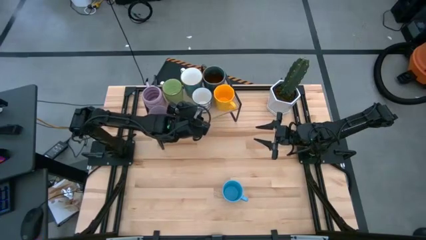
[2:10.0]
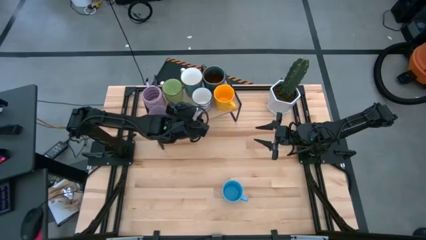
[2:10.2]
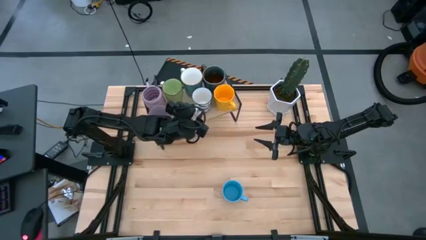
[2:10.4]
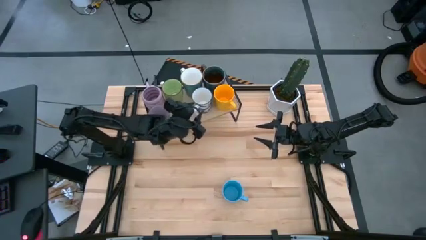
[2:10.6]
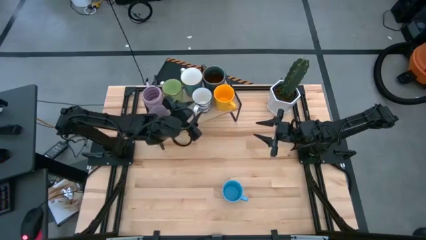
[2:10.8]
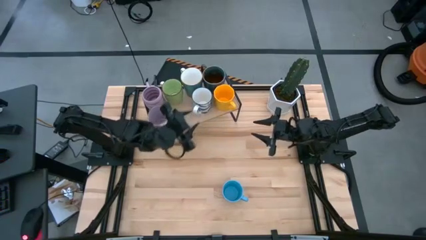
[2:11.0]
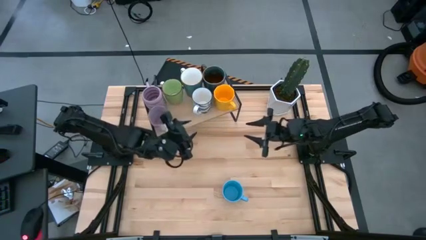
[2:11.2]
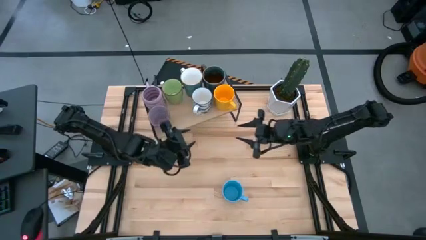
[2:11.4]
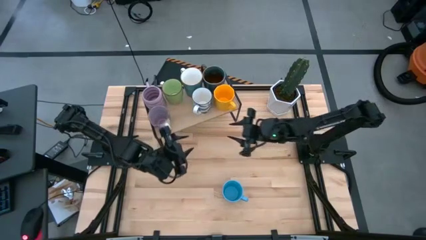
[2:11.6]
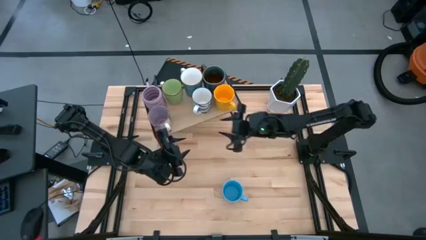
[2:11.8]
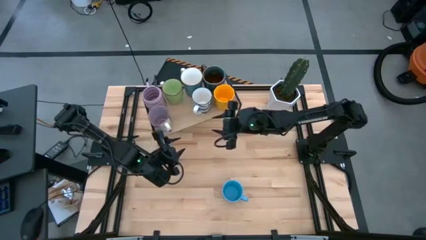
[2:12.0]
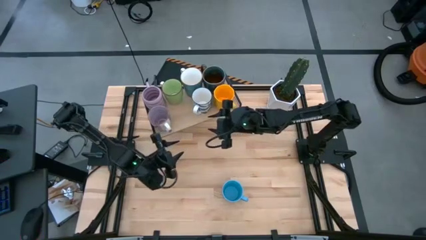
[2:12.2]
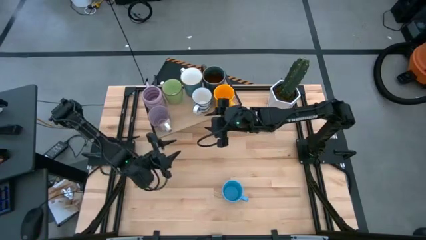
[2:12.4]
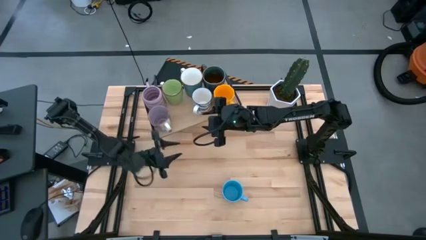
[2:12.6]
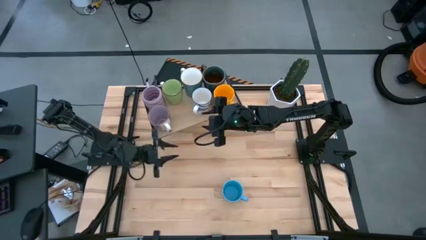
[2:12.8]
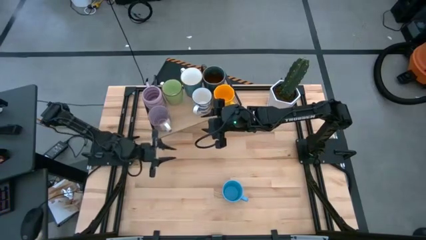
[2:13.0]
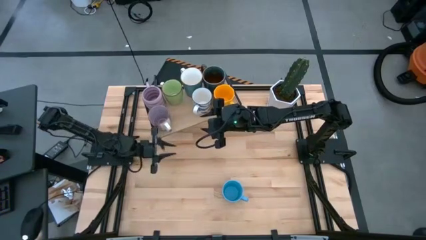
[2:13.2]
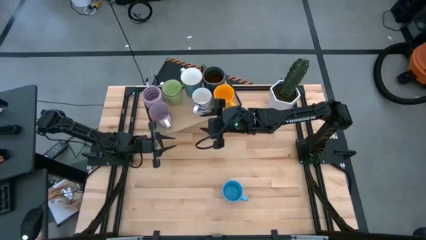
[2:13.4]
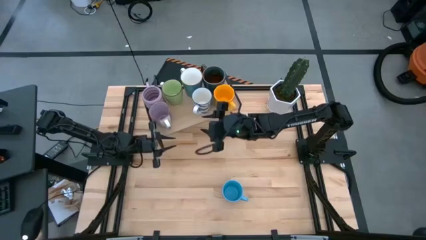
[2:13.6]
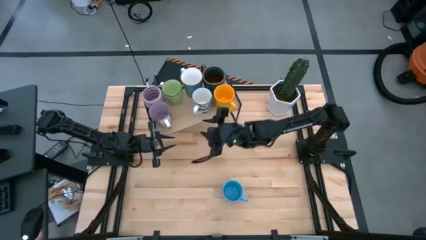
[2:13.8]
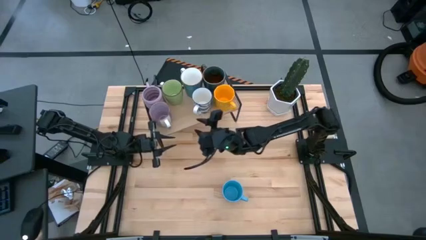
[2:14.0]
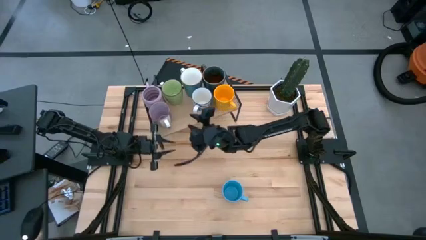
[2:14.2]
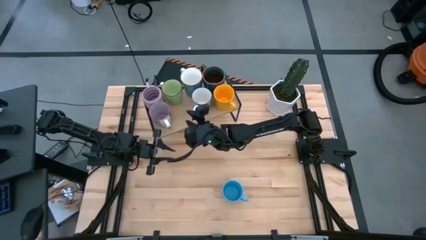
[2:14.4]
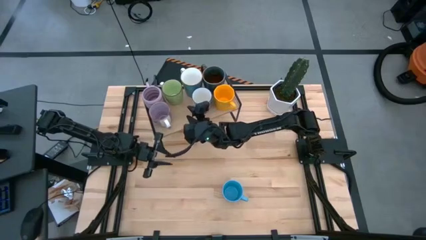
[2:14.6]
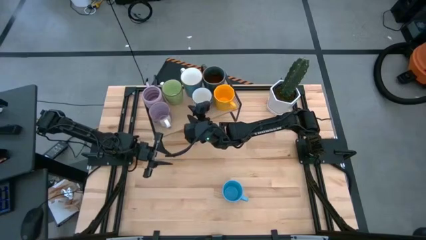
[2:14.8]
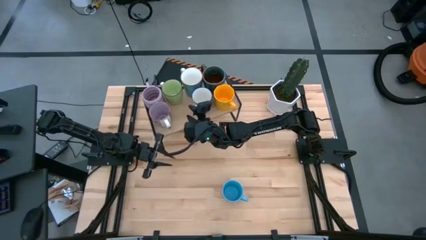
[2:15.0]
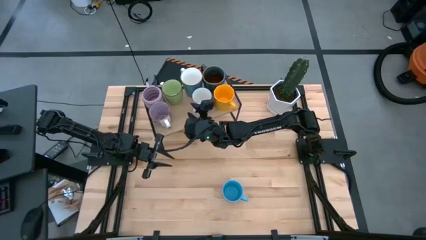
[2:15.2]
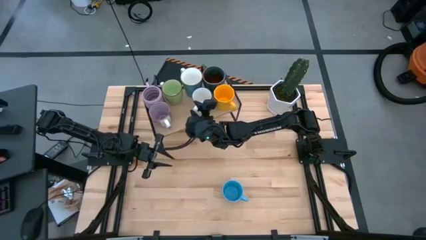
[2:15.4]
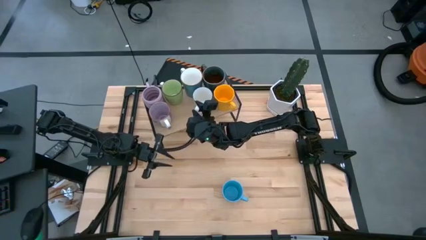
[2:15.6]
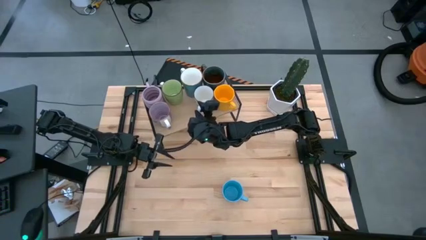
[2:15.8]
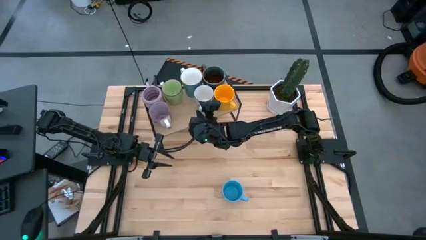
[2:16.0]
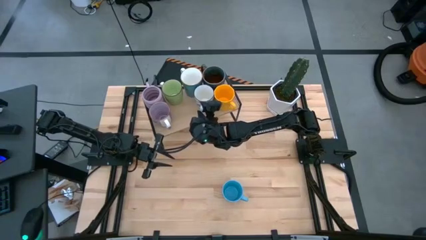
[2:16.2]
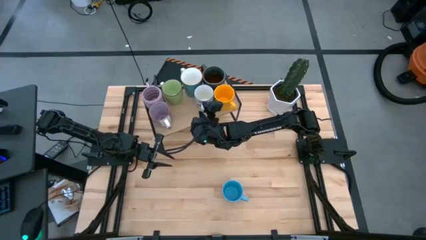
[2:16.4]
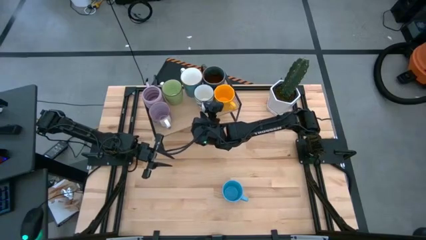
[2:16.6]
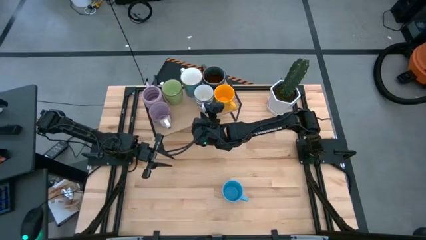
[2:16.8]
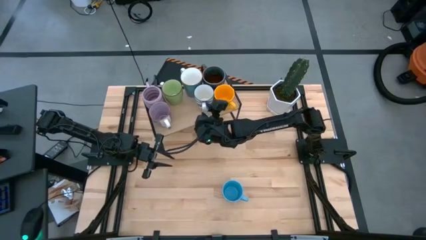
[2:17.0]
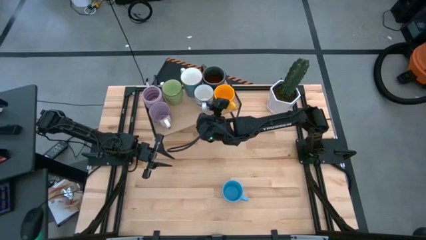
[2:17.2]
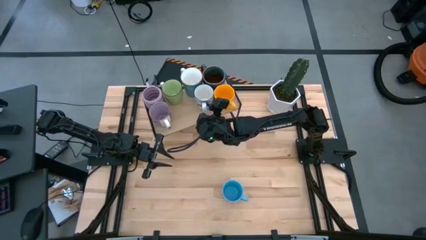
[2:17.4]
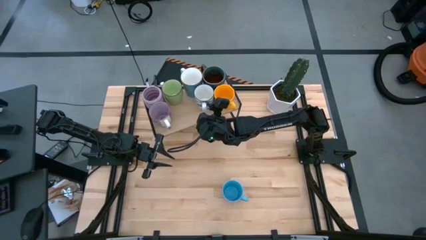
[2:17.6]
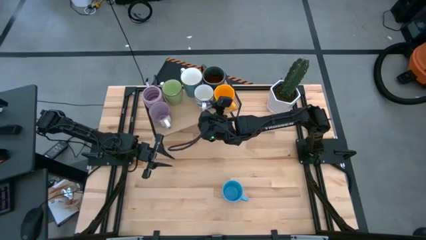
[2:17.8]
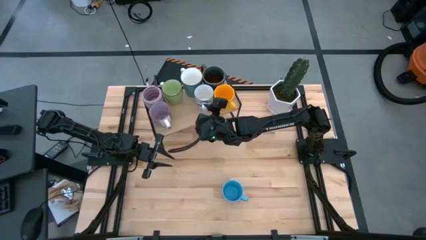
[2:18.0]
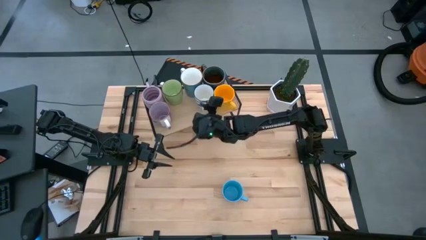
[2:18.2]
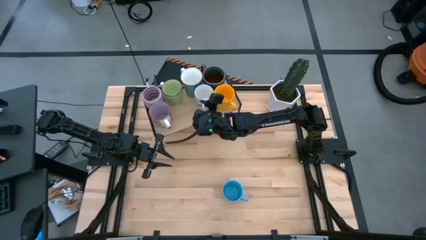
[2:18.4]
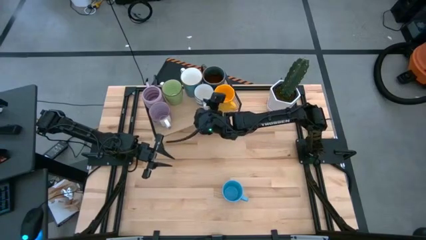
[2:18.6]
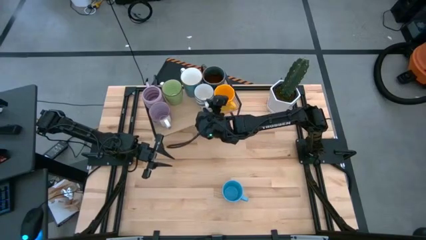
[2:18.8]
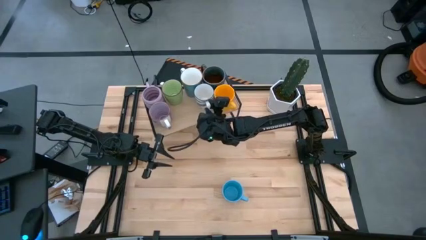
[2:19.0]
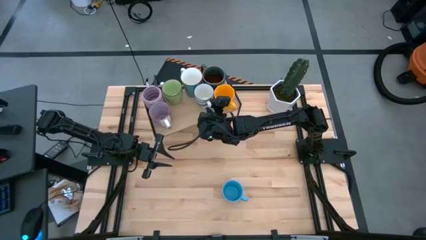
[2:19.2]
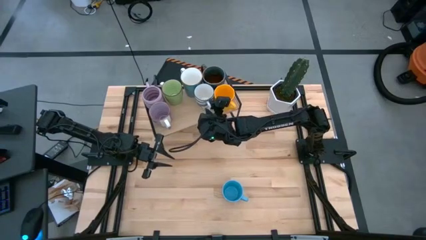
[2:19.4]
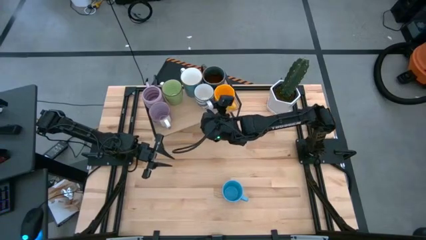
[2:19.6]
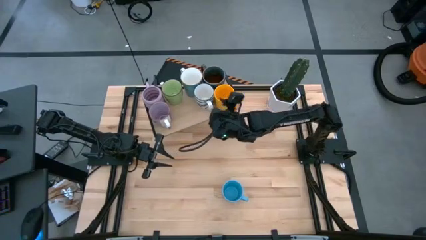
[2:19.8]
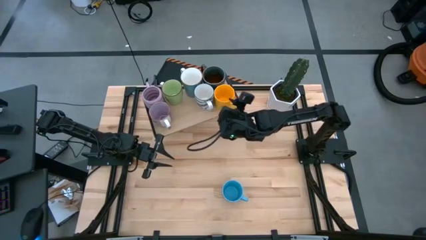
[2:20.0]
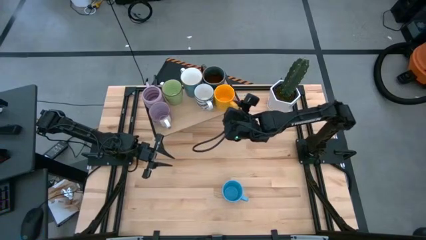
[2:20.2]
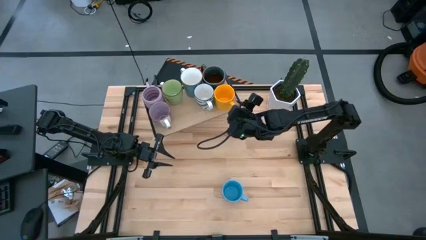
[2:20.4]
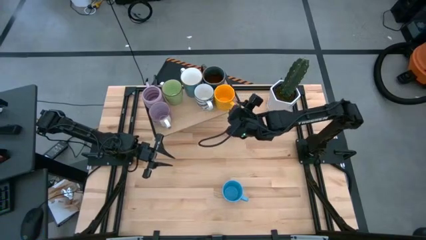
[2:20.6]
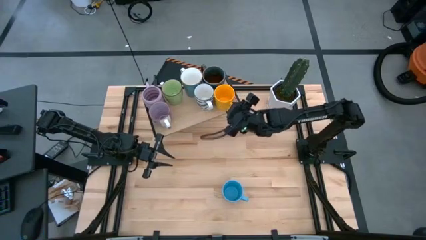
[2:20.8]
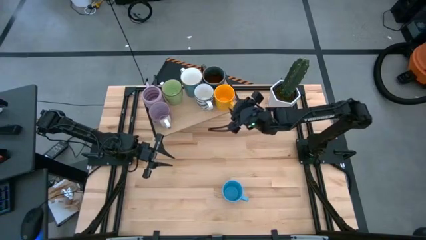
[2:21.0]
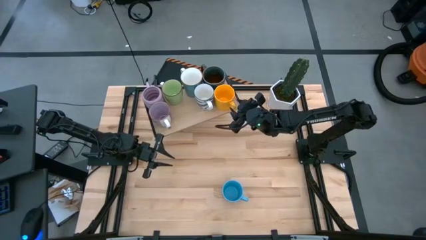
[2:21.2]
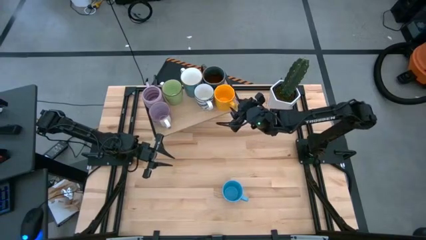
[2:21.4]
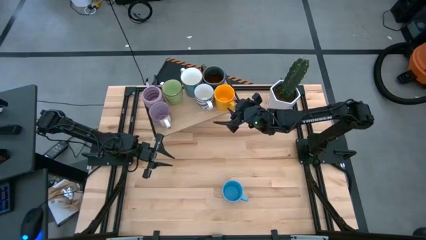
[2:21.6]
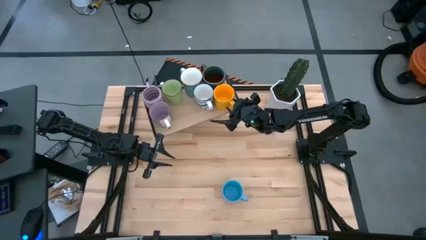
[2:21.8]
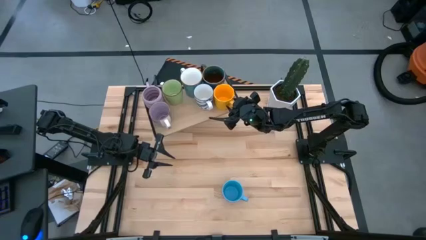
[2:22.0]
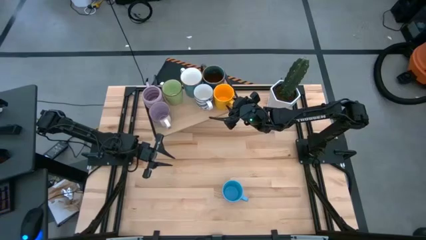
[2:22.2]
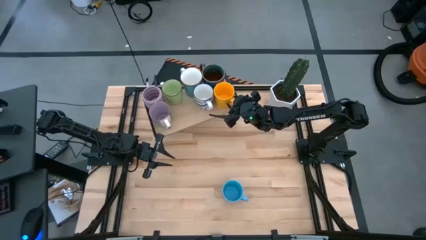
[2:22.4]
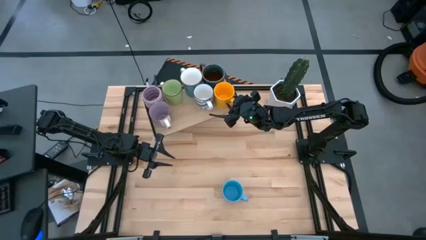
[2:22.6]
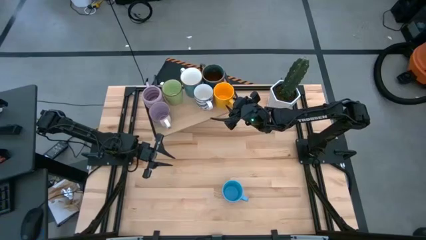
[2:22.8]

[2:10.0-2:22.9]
Task: Place coffee mugs
Adjust the purple, white-blue patterned, and yellow mugs on the shelf
